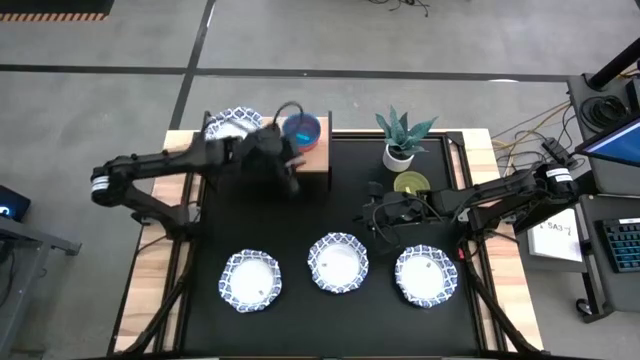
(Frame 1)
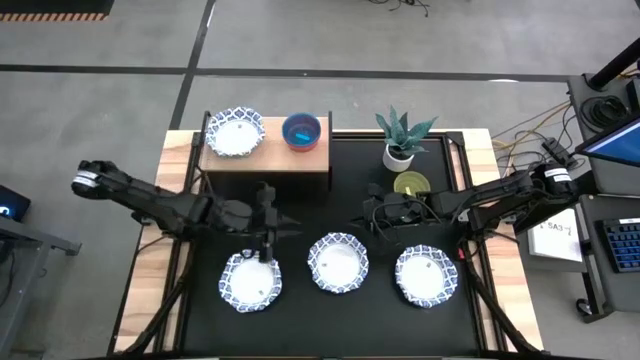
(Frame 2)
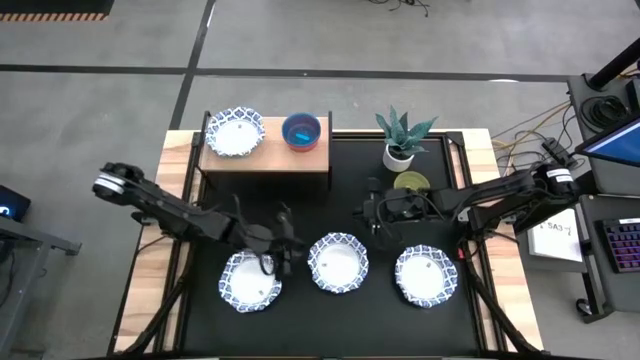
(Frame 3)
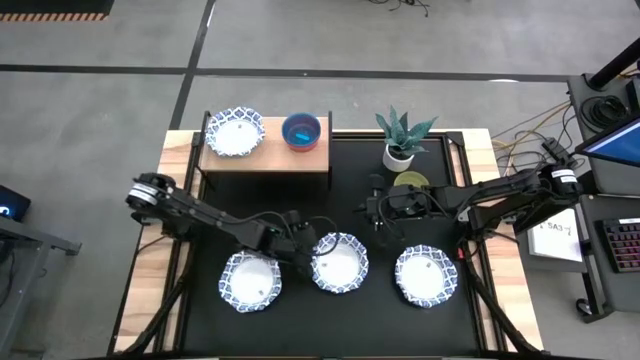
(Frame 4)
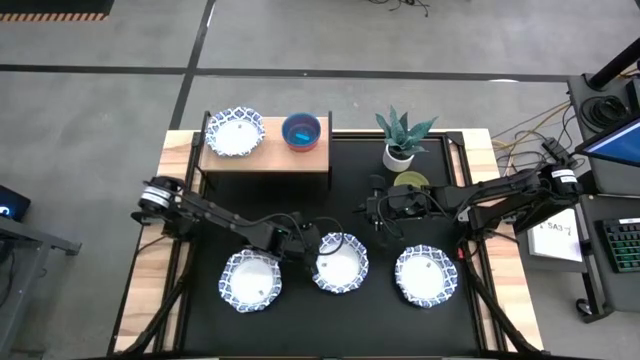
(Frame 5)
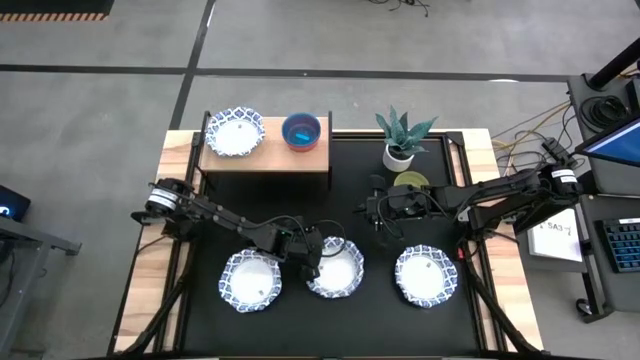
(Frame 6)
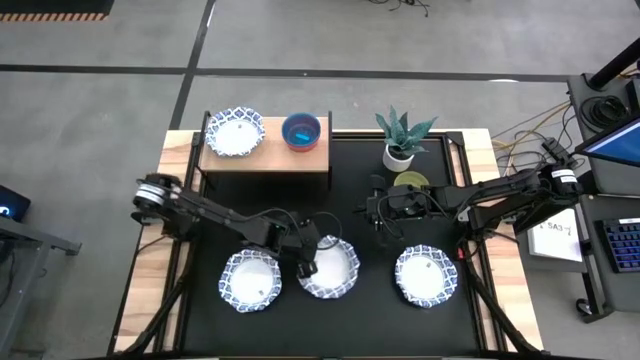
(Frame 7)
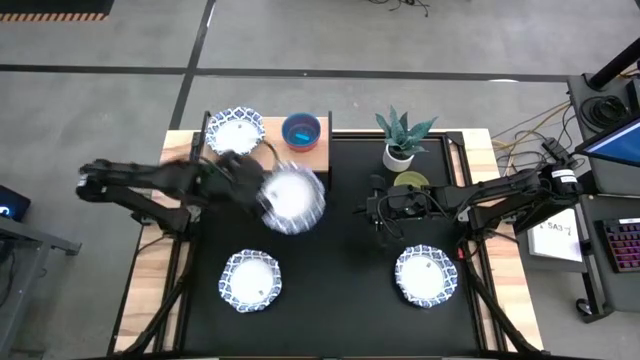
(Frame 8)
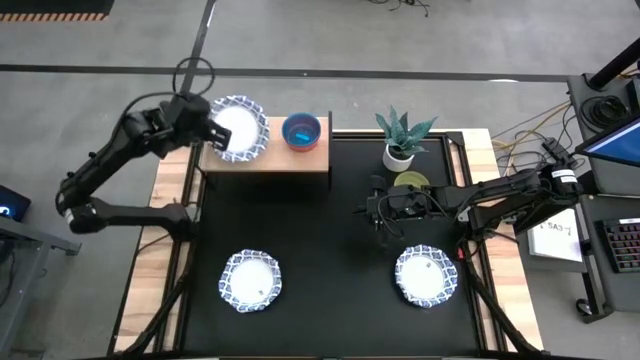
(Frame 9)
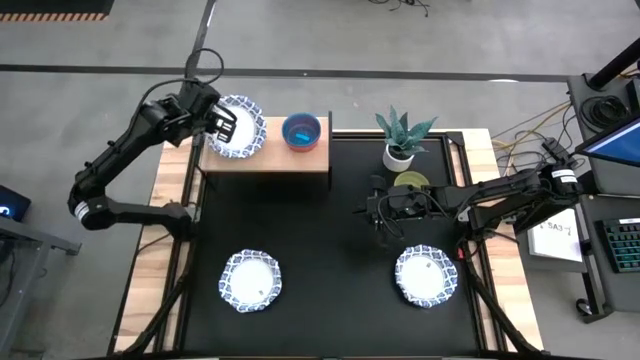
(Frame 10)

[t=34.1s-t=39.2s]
Task: Place and stack bowls onto a shelf
Stack the white patterned bowl on top of the other white patterned bowl on the shelf

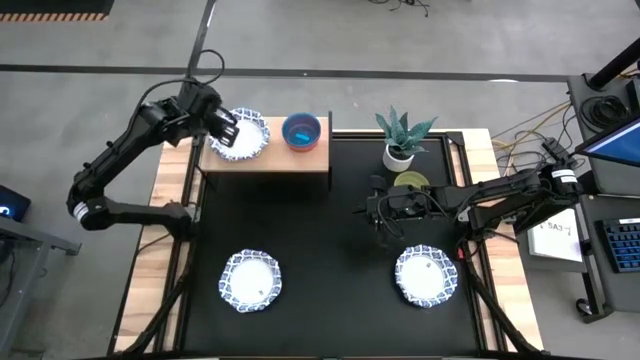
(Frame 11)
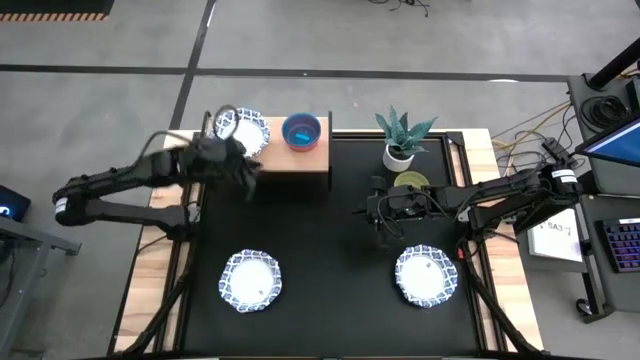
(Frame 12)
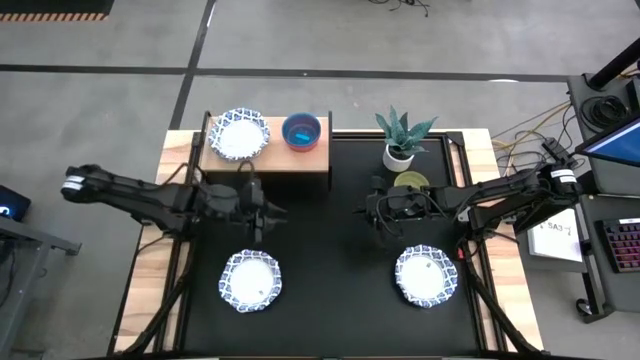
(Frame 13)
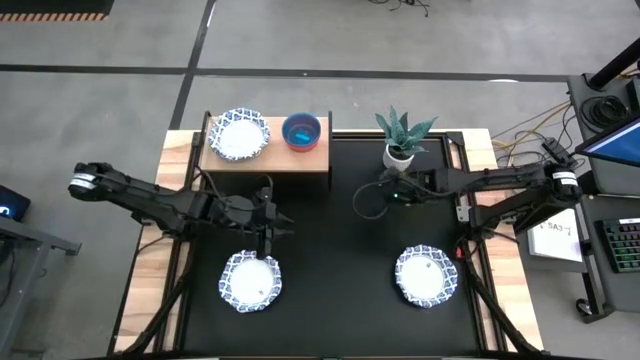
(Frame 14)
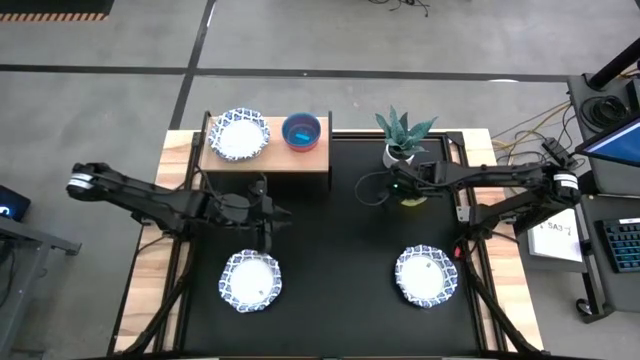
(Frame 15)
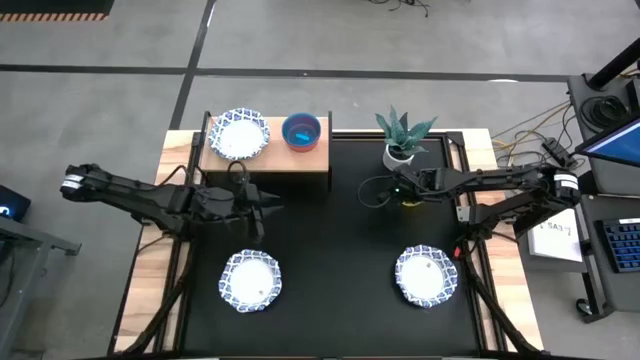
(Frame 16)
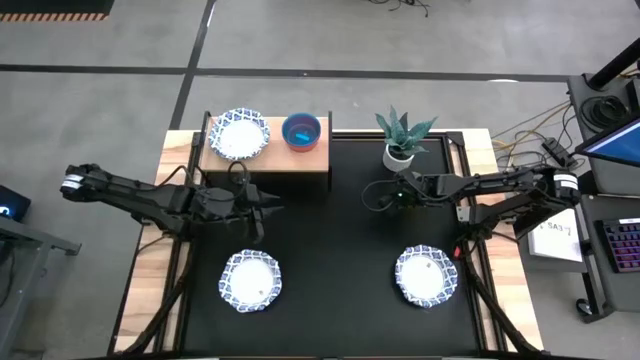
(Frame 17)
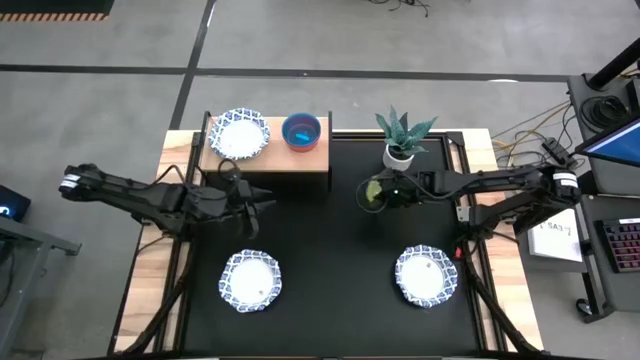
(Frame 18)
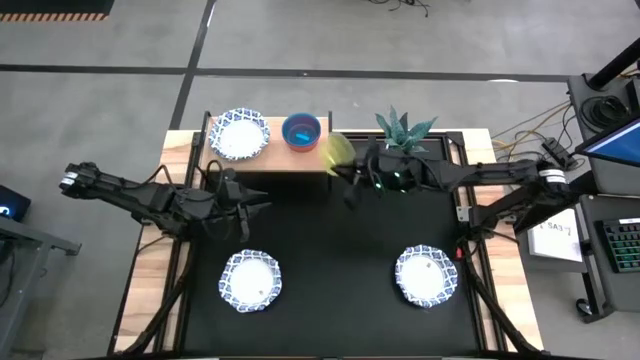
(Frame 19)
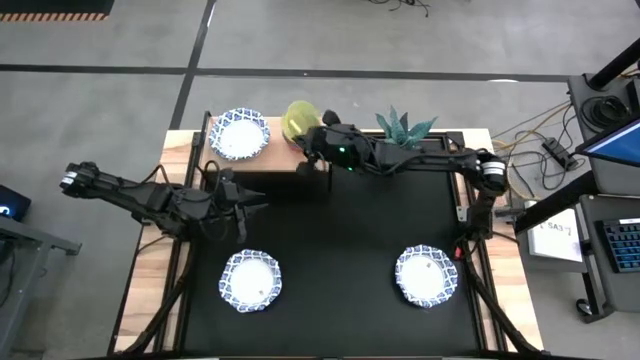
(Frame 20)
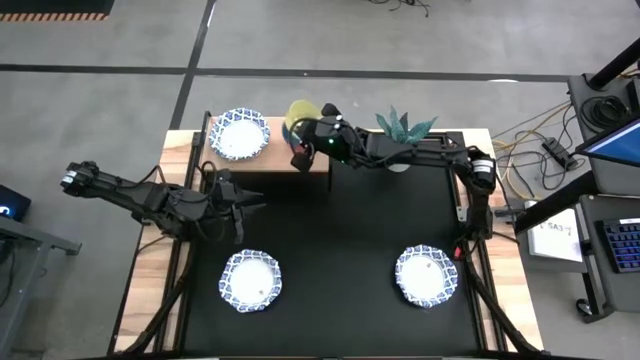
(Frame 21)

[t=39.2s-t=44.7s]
Stack the yellow bowl on top of the blue bowl on the shelf

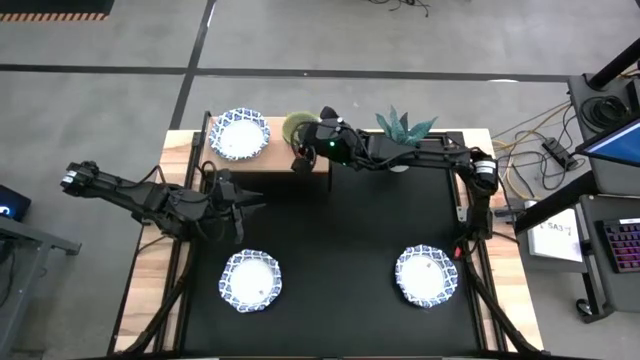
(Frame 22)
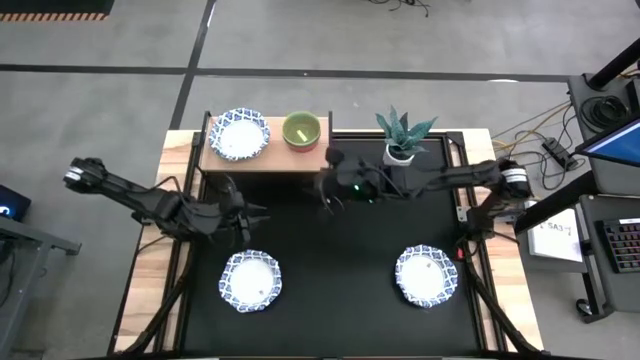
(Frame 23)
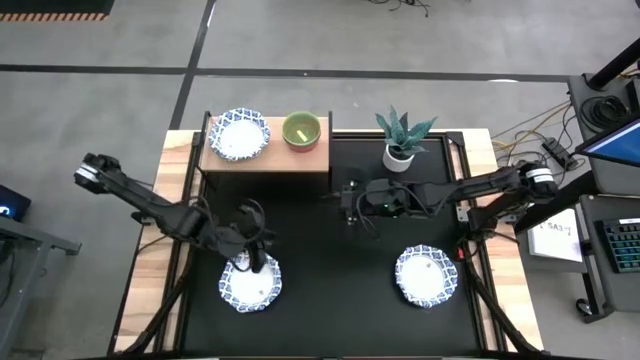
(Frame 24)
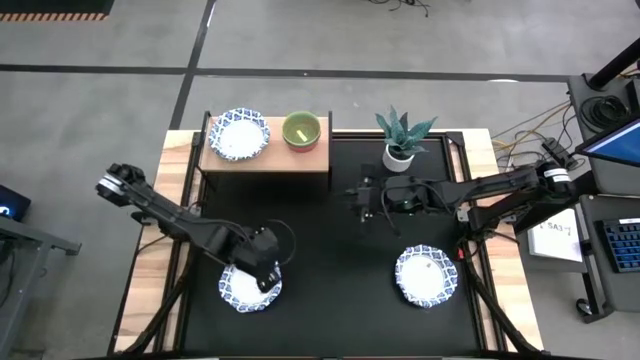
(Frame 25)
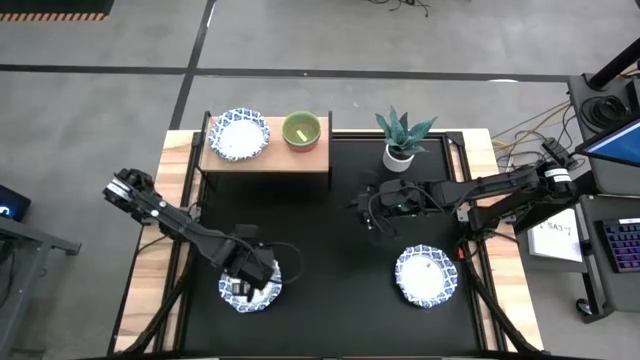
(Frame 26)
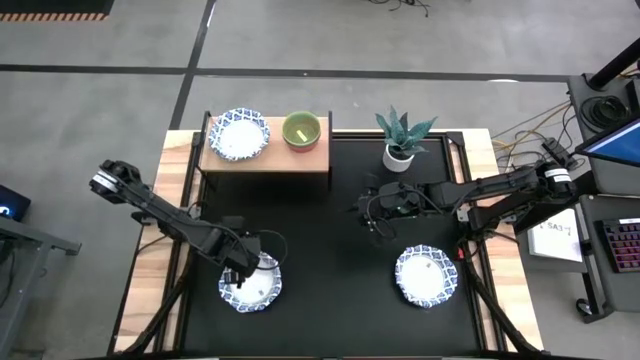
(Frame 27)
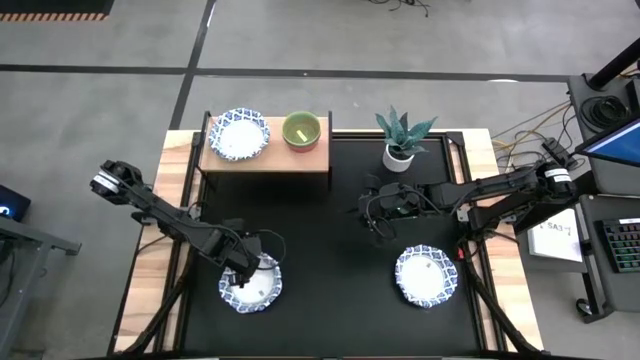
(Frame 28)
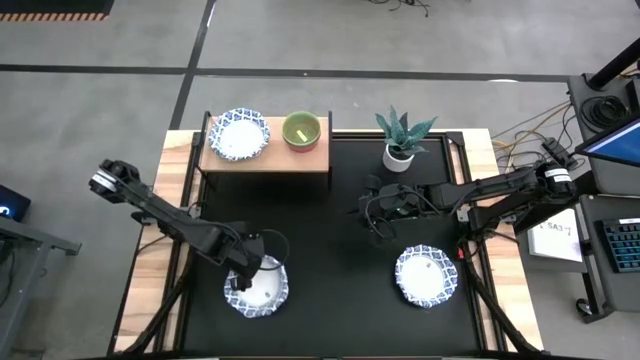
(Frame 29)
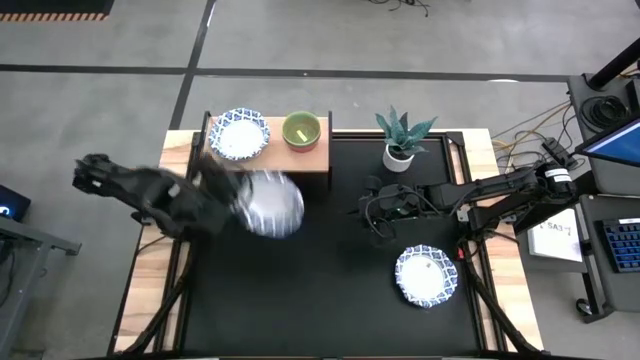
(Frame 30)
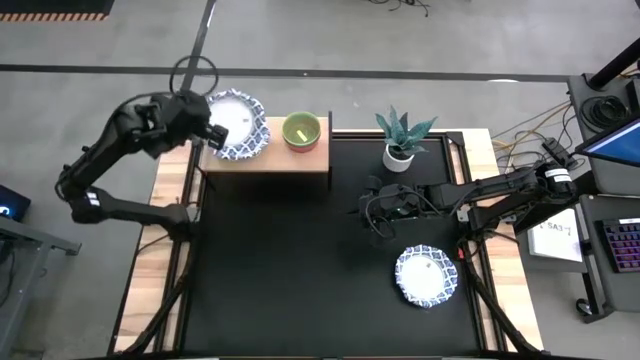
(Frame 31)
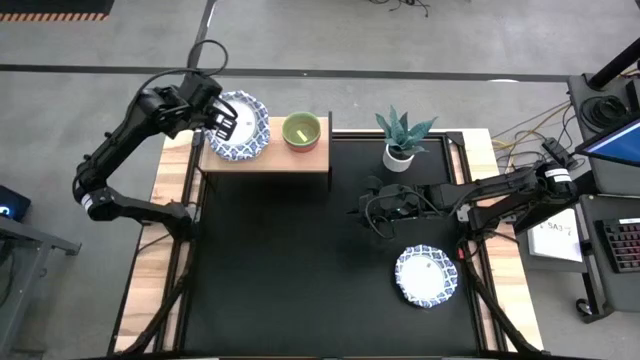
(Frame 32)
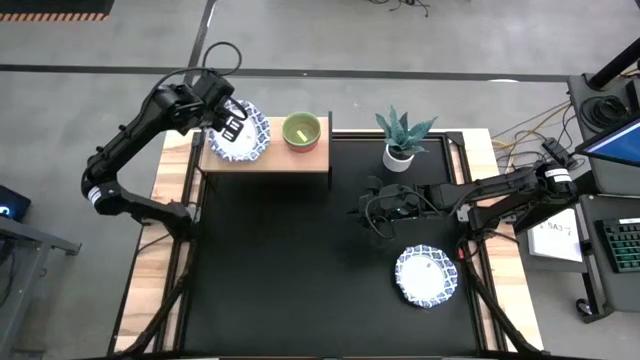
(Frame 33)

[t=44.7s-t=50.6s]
Stack the white patterned bowl on top of the other white patterned bowls on the shelf

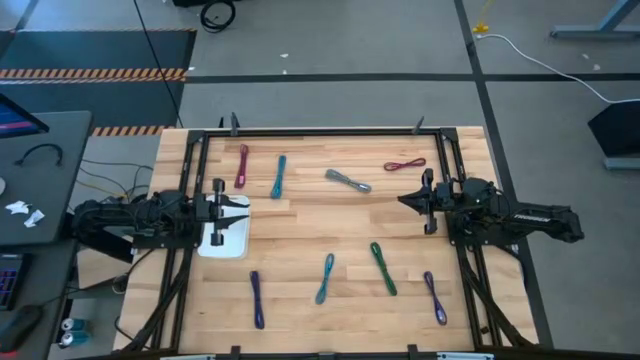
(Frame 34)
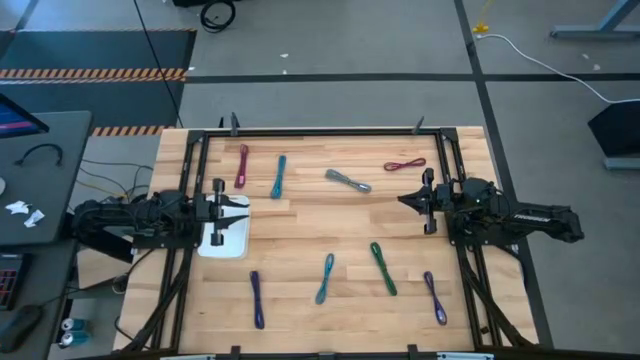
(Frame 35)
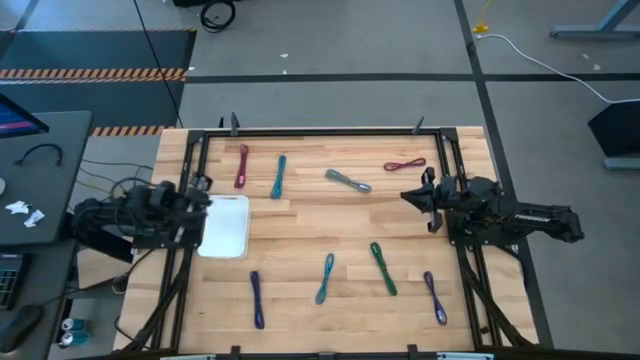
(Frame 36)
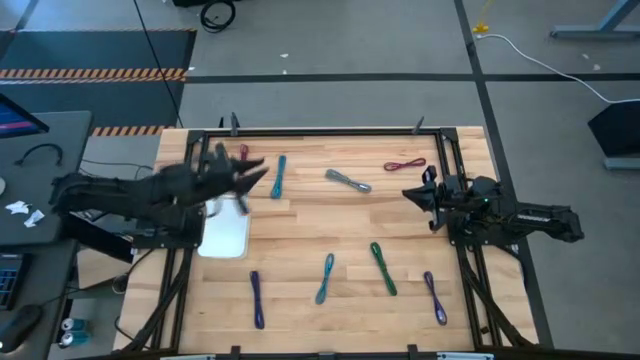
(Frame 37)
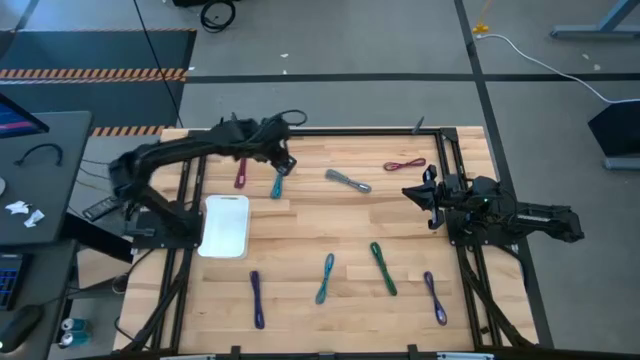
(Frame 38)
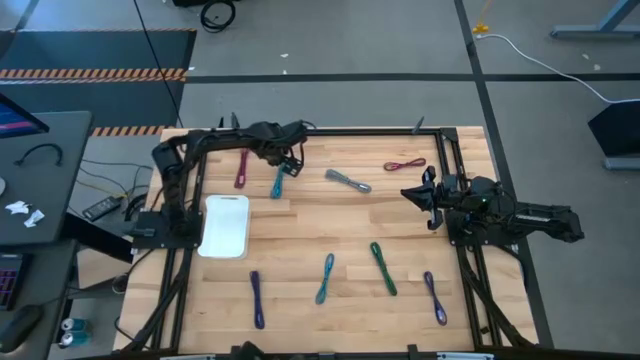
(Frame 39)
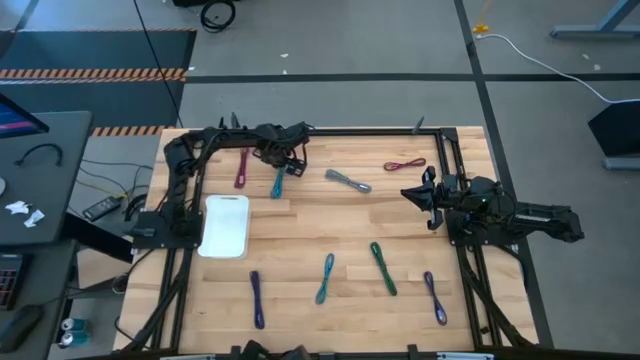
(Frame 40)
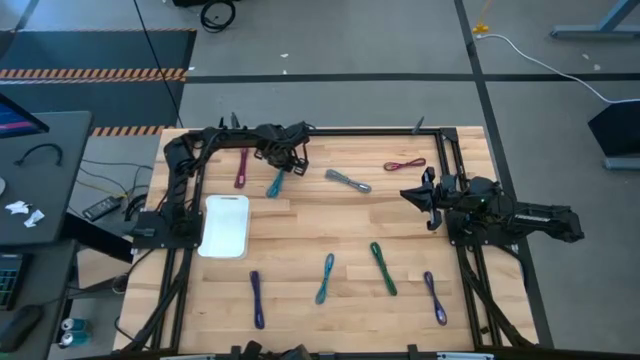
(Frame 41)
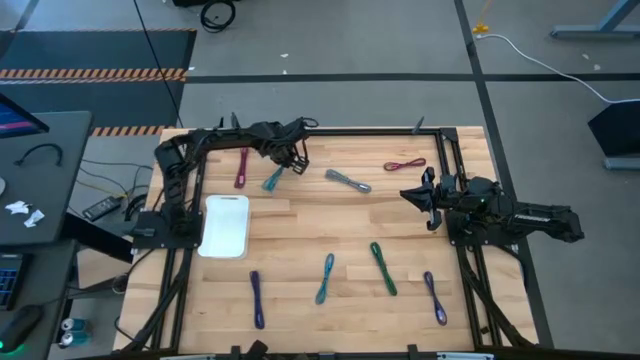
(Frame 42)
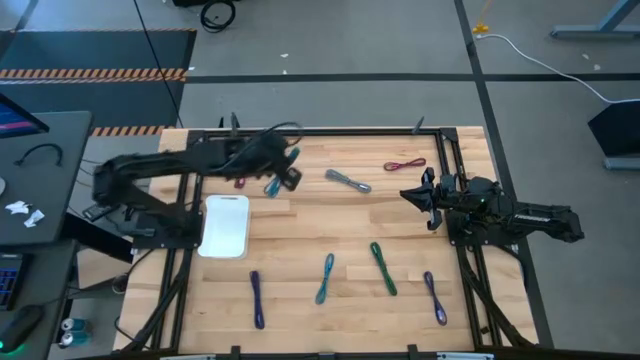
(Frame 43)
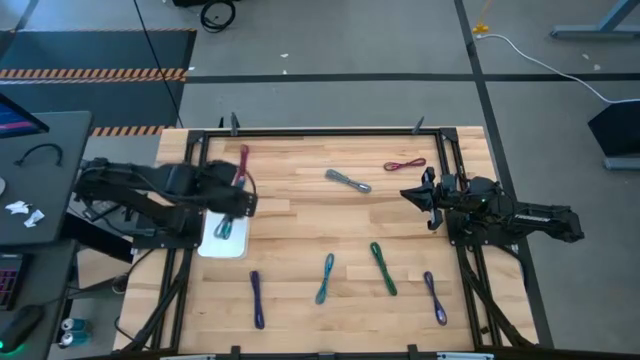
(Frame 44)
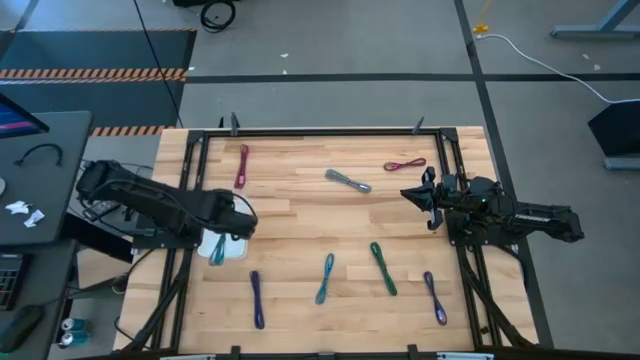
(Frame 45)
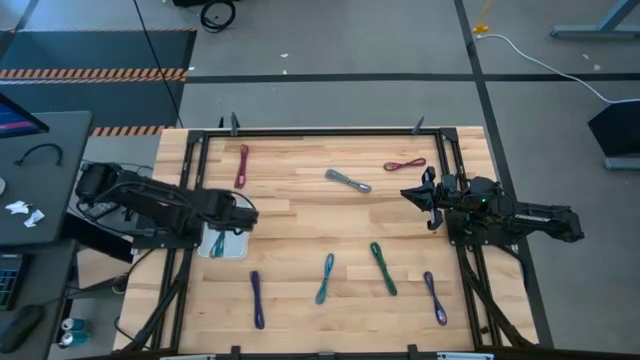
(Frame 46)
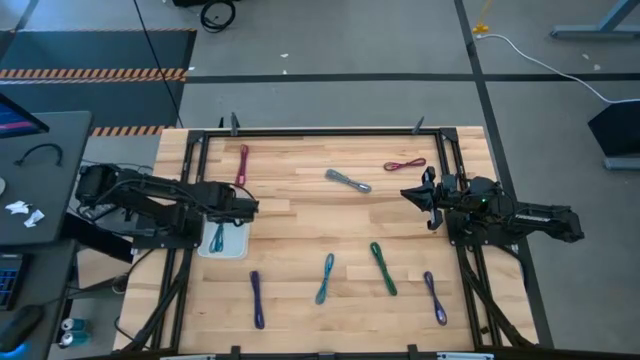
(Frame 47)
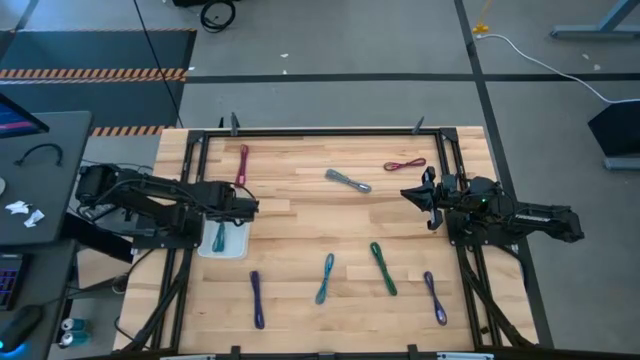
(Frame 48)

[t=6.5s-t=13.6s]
Task: Pick and place USB-C Cables
Put the top blue charger cable into the white bin
